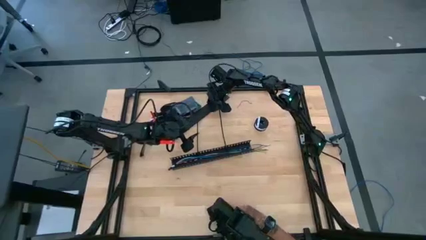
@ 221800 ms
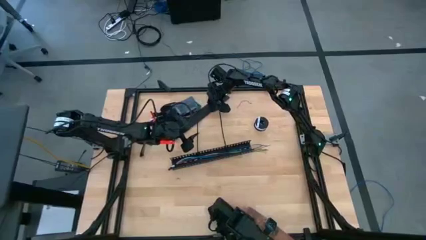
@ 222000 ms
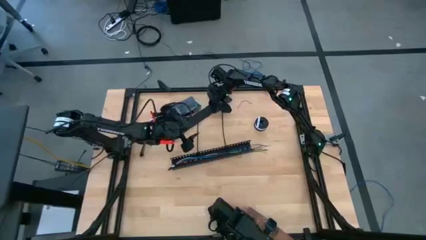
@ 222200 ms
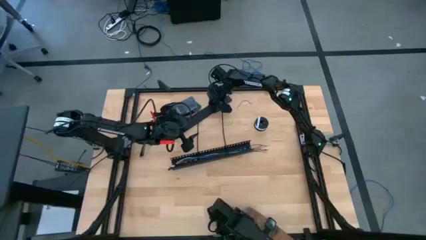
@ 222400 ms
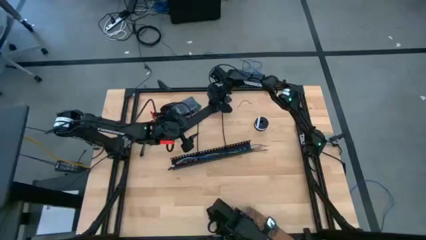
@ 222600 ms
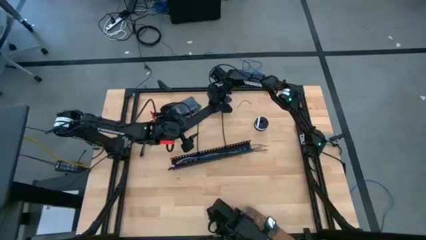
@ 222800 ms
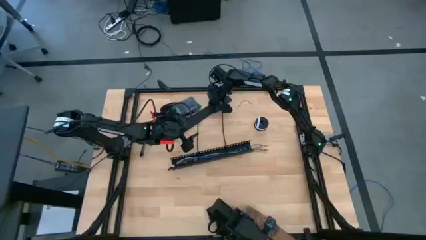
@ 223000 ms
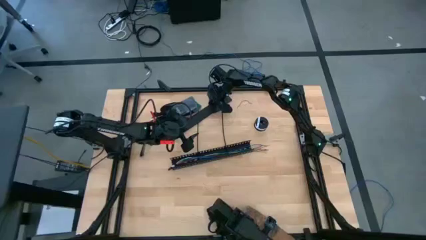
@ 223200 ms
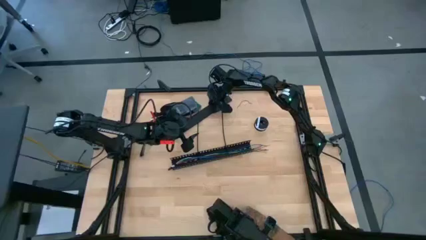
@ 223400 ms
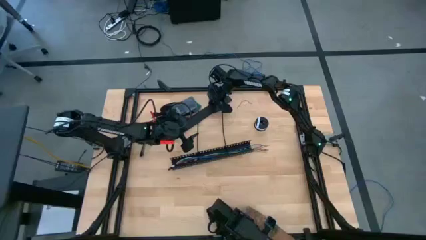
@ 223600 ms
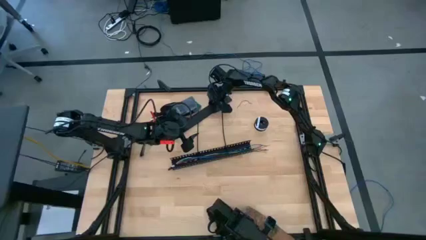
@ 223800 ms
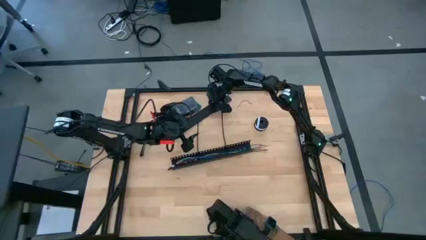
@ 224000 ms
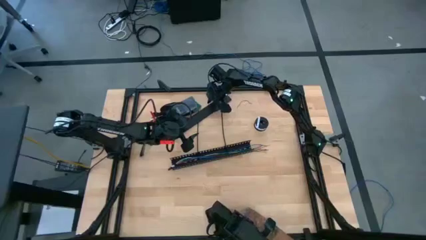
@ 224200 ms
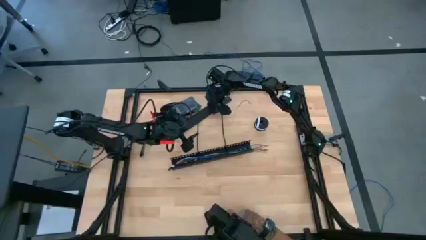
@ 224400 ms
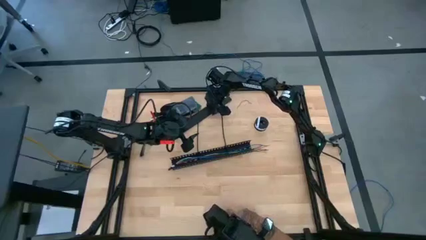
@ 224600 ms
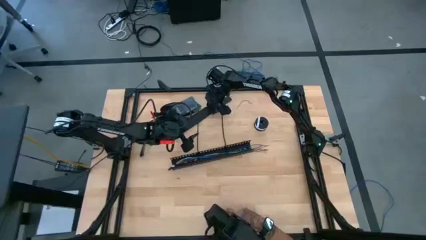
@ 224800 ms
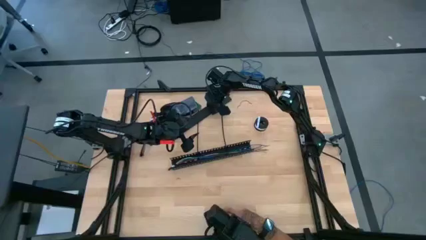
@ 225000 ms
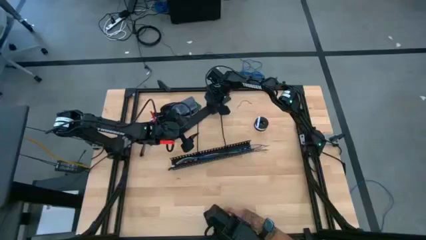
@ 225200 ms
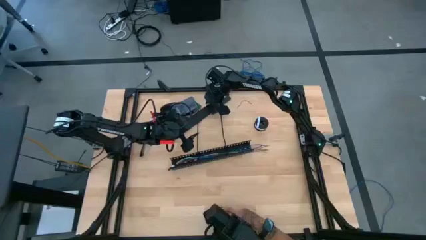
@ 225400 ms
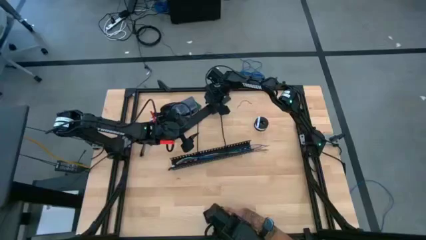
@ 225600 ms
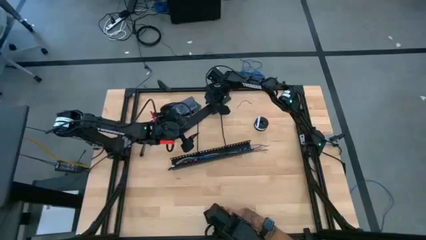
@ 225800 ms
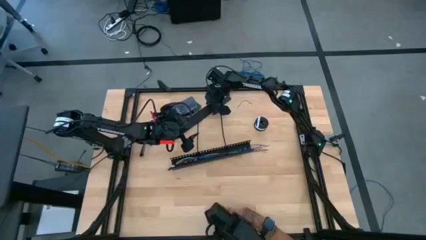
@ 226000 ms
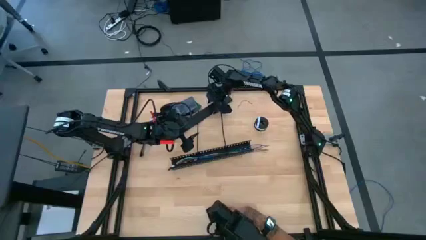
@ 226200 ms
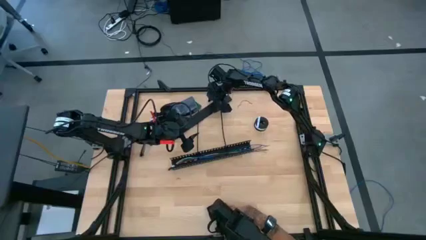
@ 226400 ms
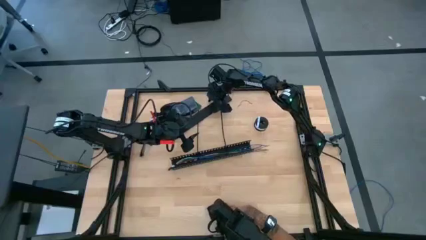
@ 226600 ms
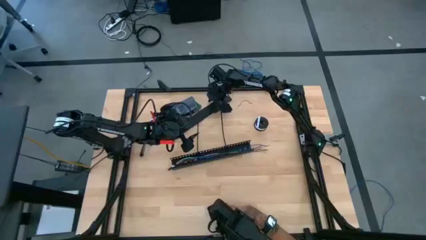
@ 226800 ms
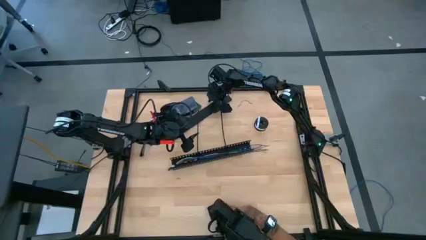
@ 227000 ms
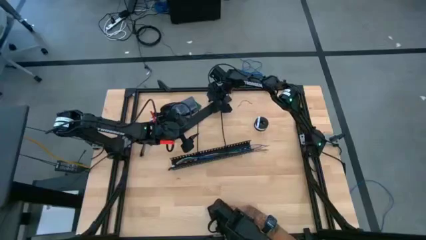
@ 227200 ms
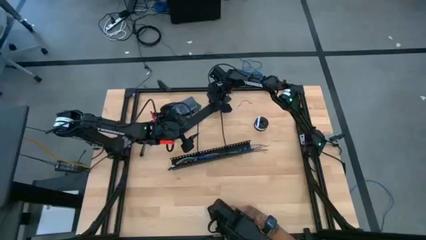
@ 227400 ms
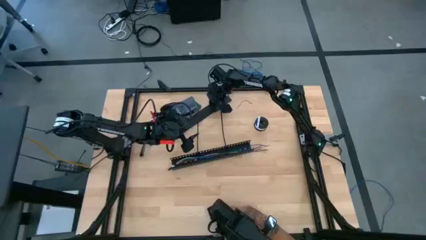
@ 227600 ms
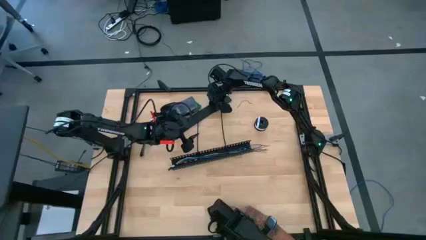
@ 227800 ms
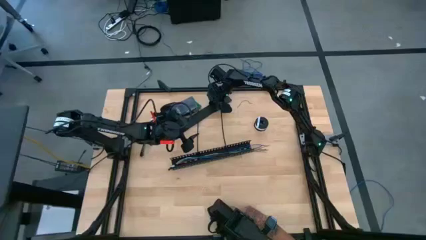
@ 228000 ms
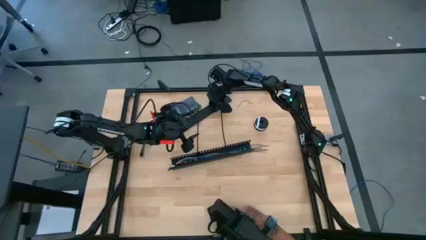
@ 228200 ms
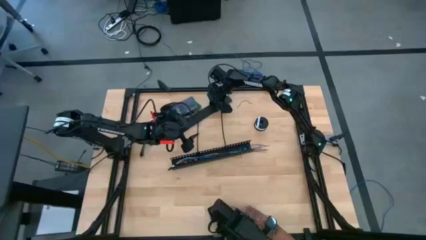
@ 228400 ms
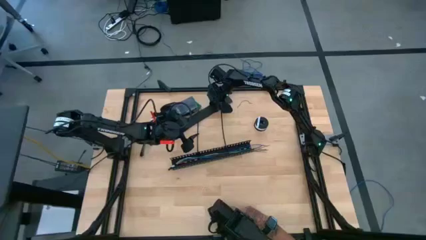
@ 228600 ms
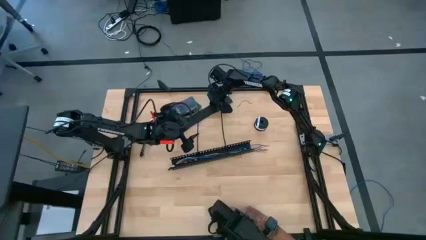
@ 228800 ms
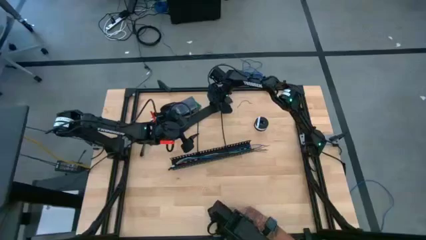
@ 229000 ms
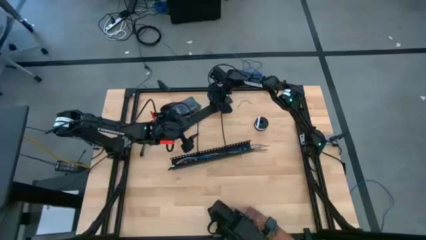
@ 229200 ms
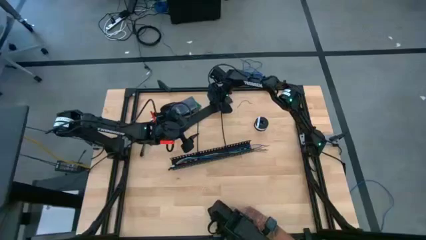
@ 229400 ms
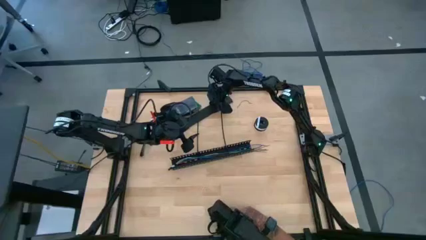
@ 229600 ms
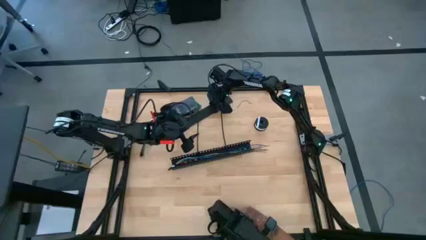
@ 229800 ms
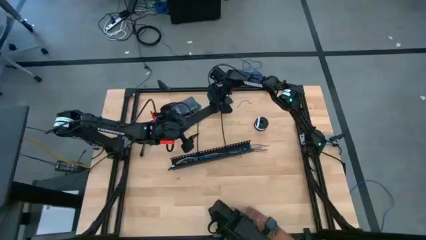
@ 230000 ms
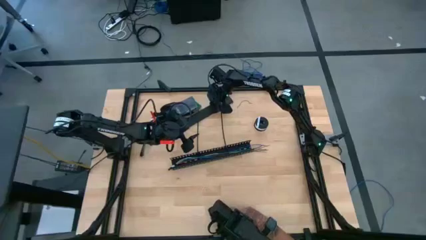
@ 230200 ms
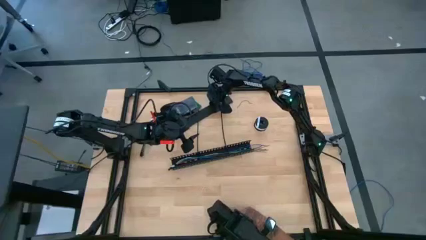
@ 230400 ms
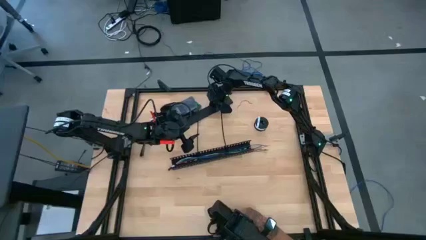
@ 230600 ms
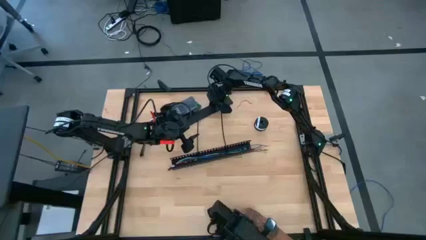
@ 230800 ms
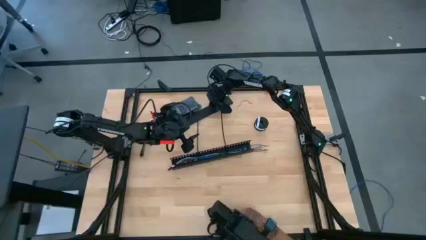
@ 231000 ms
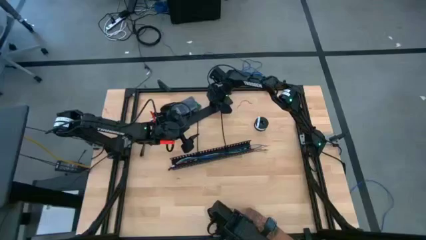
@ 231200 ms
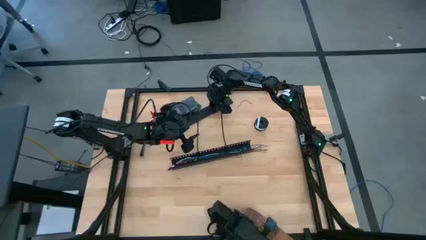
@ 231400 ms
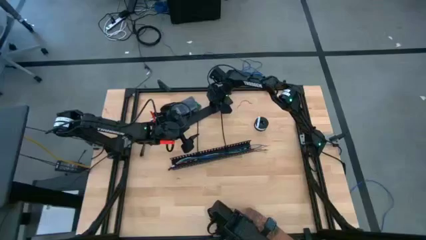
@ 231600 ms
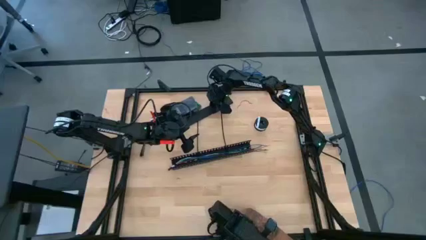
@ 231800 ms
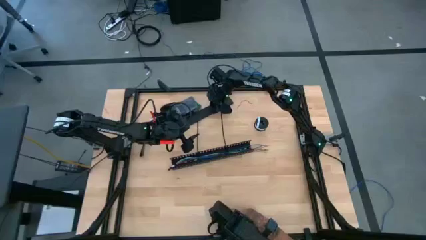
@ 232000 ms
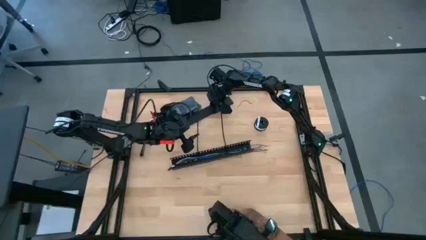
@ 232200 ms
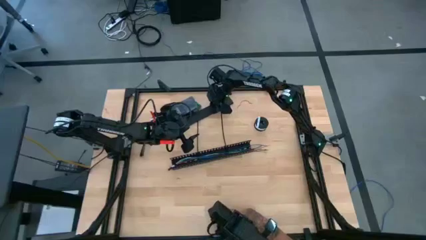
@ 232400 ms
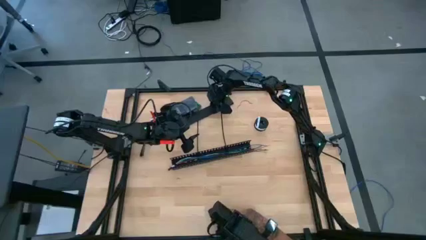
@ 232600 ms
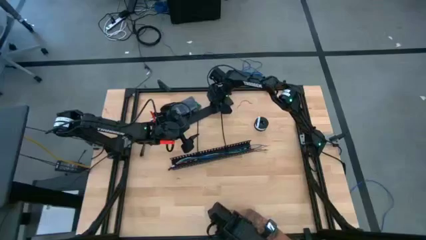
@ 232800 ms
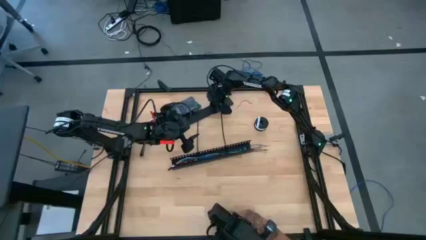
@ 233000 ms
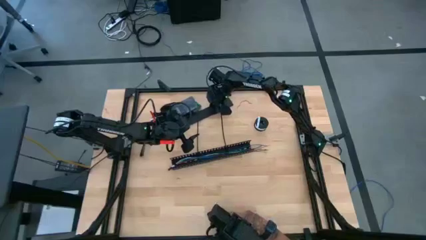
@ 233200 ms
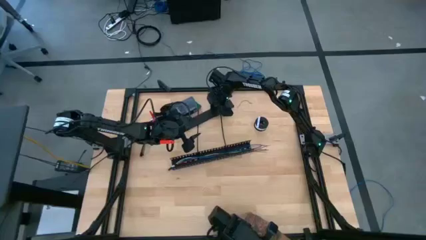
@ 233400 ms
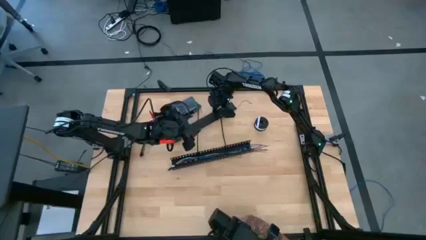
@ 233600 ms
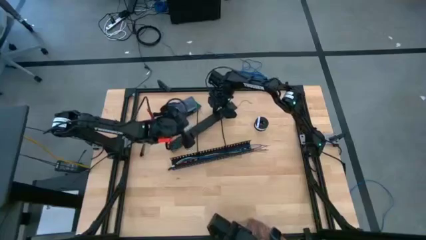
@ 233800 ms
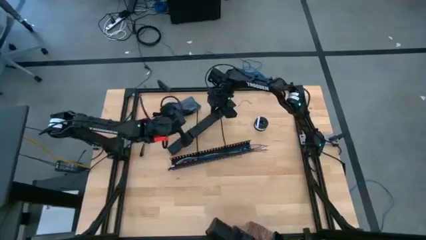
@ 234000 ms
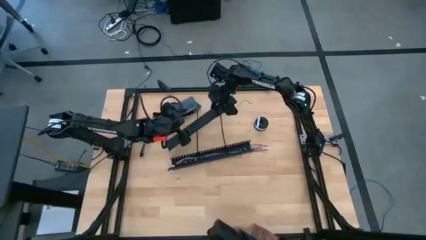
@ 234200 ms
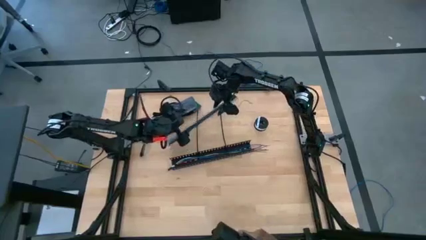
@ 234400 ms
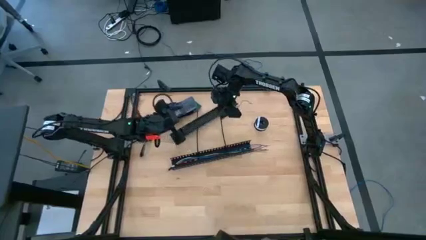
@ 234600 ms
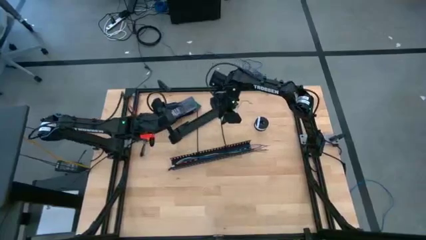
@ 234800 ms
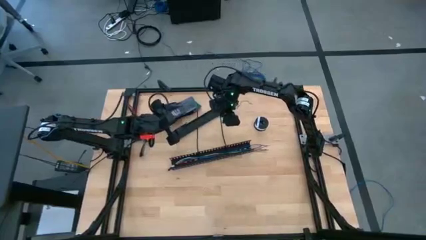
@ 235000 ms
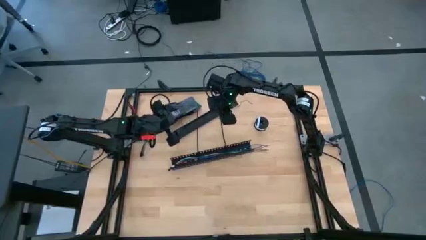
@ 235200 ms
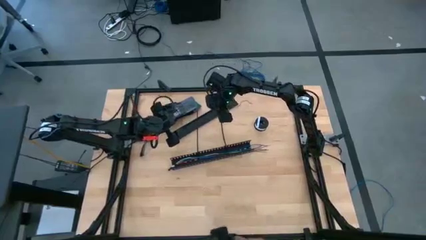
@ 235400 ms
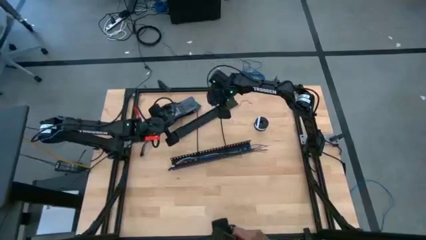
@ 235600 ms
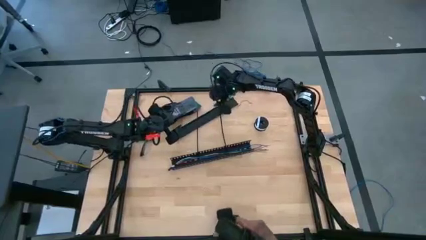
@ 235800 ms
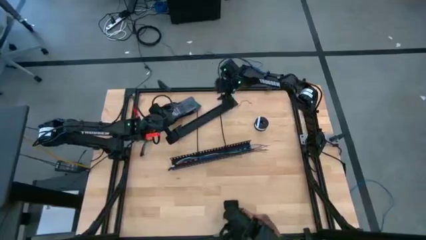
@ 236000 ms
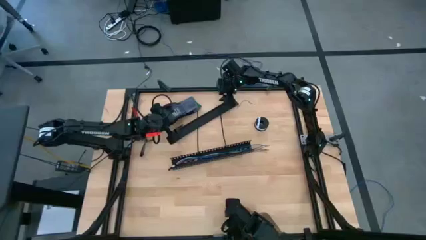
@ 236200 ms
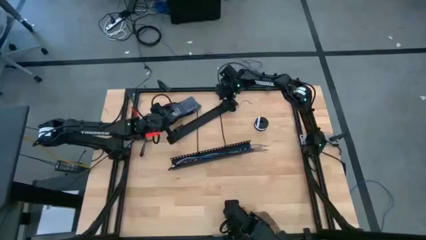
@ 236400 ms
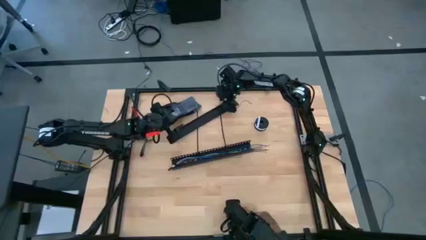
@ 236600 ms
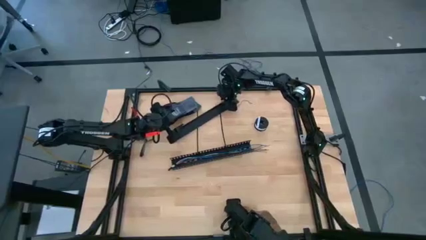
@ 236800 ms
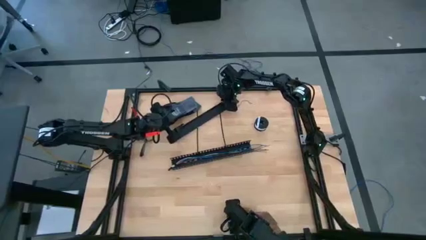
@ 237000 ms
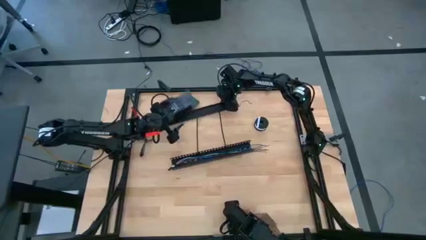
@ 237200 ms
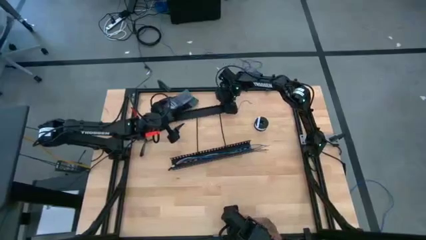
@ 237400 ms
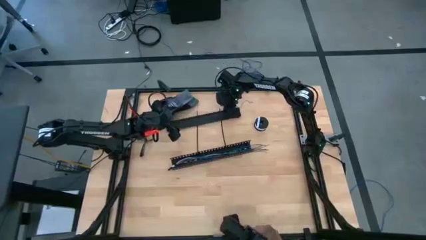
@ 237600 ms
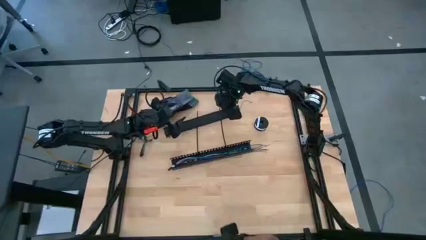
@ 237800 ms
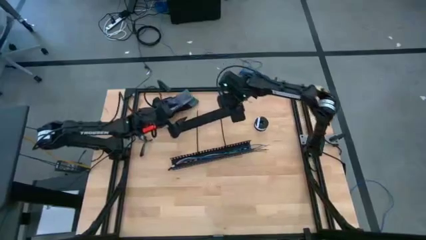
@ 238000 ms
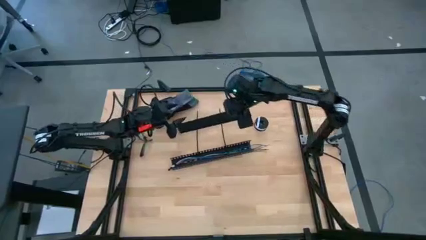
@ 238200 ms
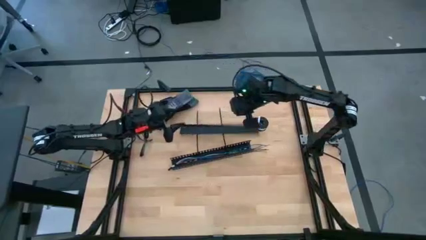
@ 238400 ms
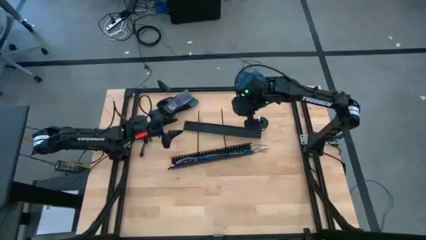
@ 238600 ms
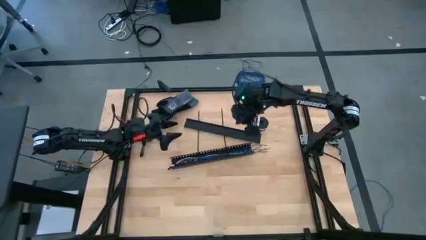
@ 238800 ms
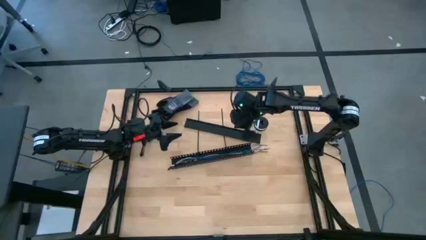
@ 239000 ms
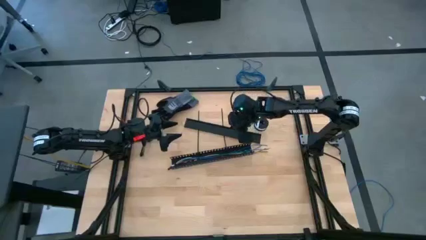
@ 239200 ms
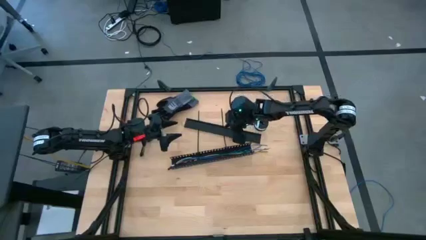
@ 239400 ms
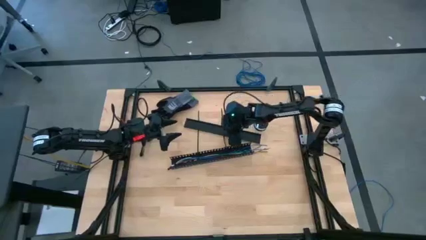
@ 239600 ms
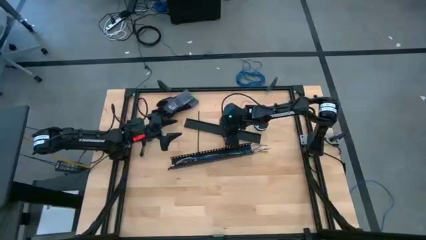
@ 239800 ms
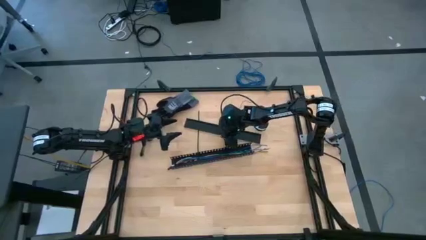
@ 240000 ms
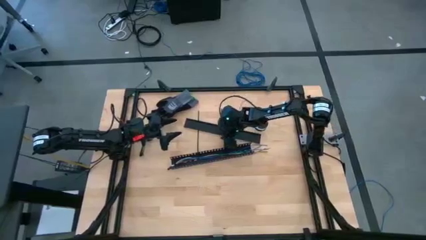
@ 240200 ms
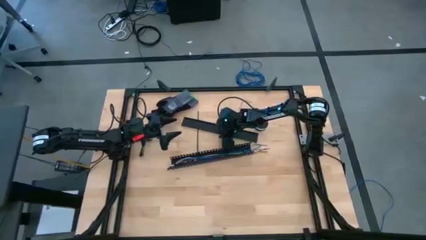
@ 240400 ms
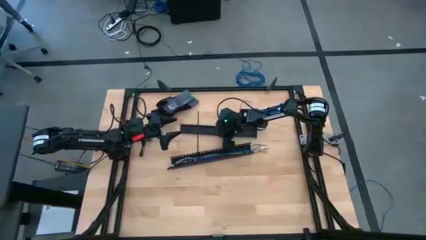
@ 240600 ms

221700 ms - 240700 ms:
Task: Ziptie cables
Close the black cable duct
